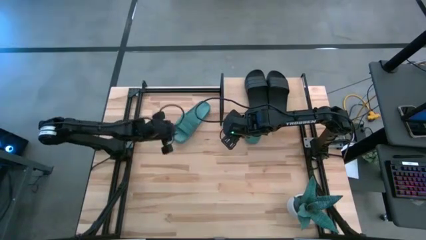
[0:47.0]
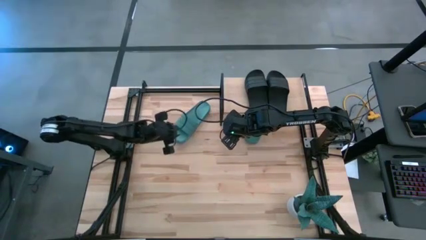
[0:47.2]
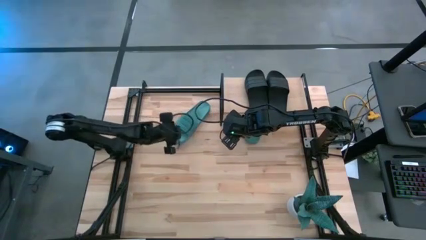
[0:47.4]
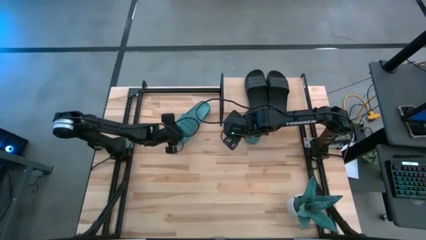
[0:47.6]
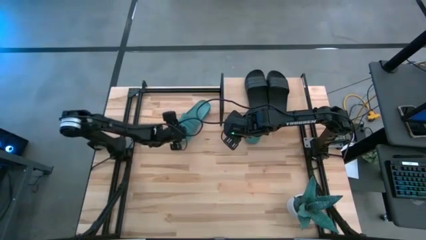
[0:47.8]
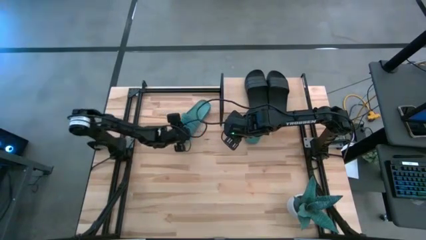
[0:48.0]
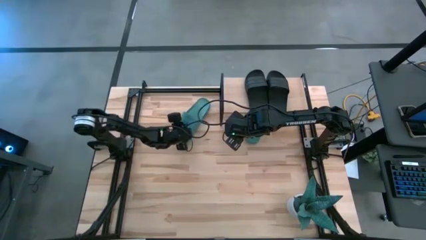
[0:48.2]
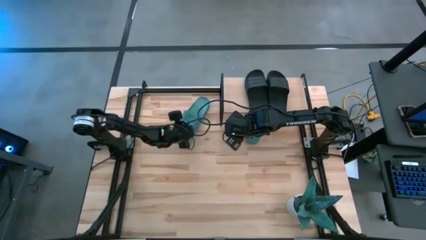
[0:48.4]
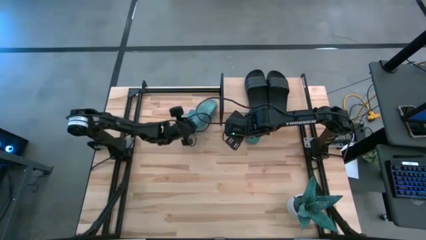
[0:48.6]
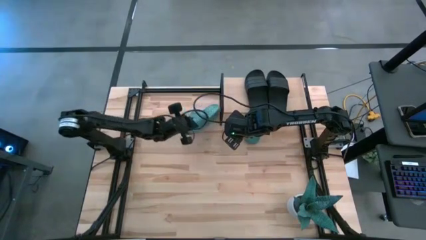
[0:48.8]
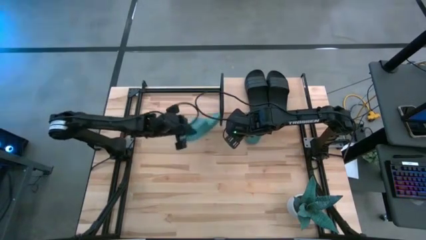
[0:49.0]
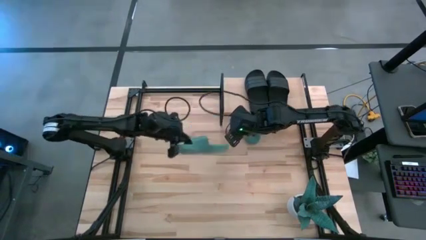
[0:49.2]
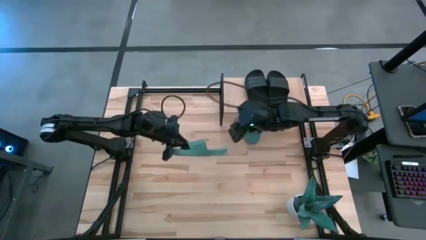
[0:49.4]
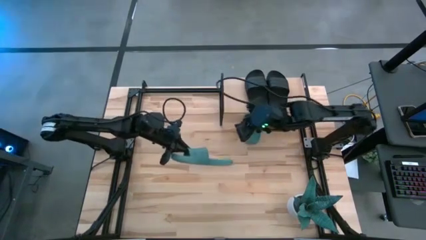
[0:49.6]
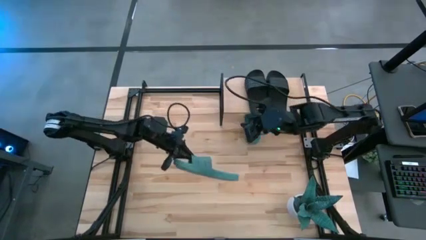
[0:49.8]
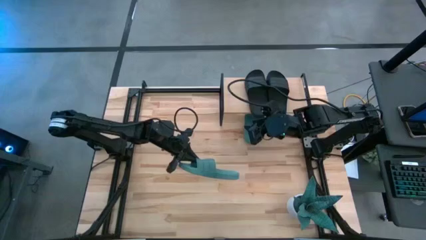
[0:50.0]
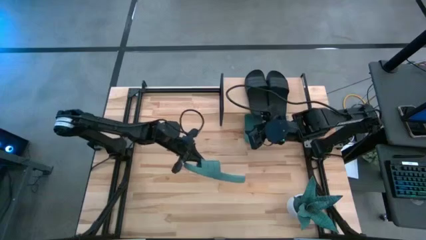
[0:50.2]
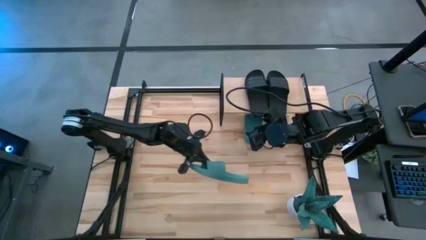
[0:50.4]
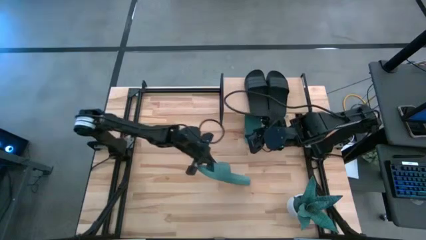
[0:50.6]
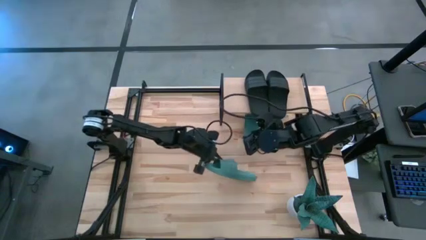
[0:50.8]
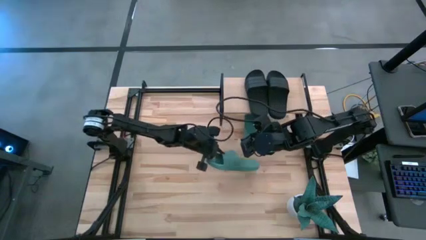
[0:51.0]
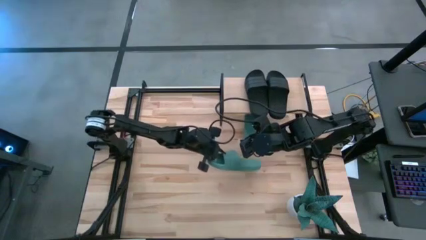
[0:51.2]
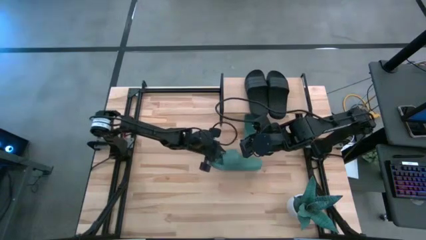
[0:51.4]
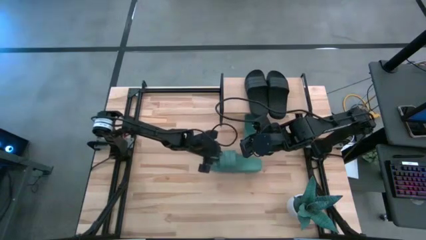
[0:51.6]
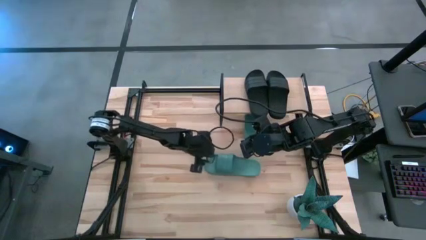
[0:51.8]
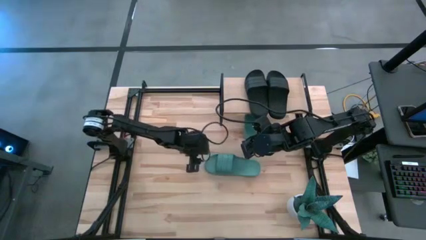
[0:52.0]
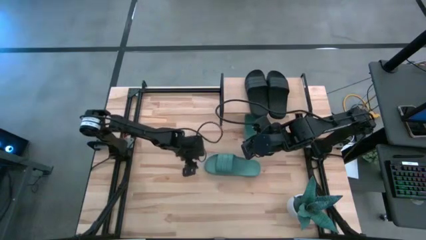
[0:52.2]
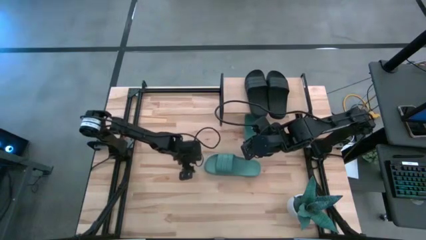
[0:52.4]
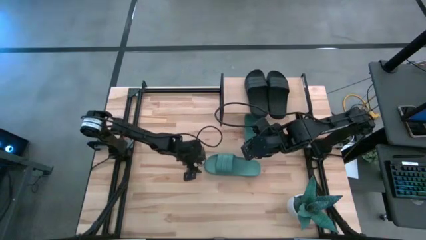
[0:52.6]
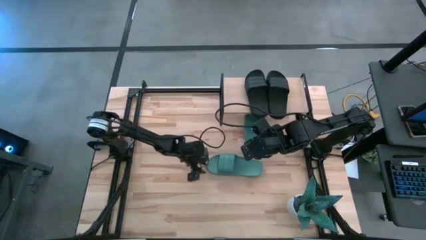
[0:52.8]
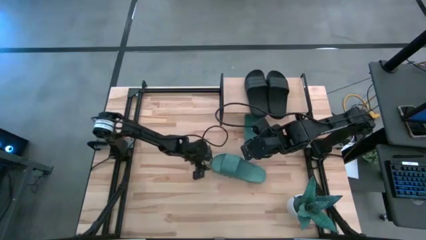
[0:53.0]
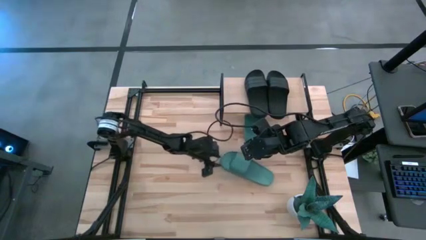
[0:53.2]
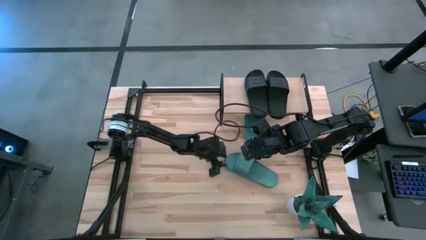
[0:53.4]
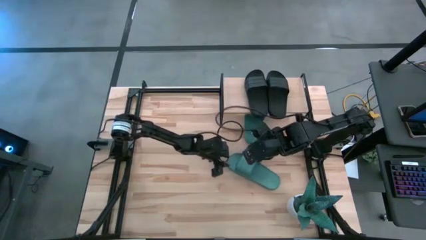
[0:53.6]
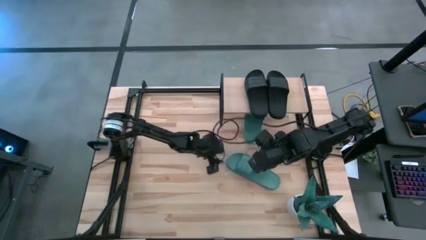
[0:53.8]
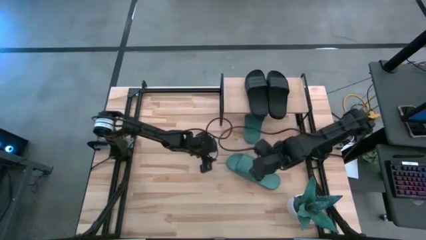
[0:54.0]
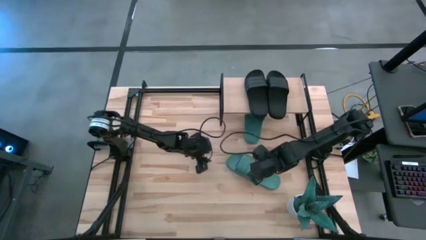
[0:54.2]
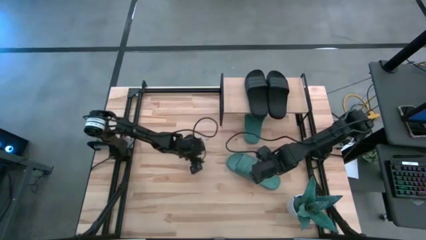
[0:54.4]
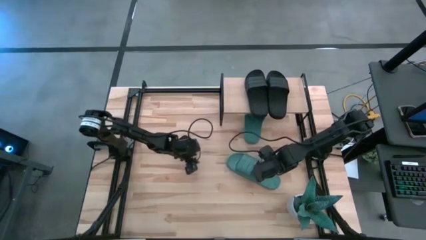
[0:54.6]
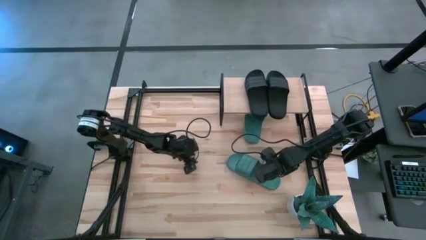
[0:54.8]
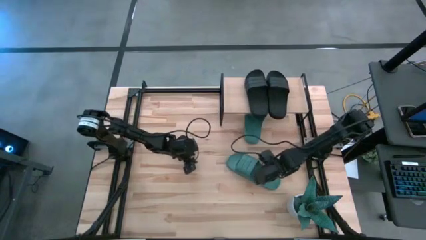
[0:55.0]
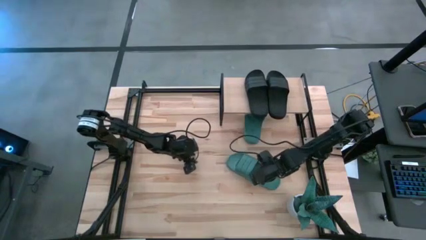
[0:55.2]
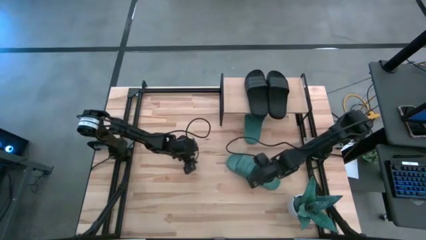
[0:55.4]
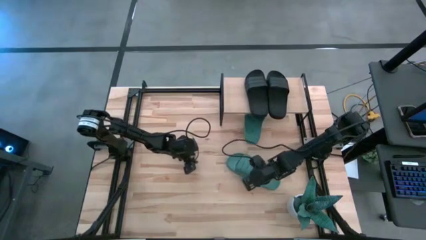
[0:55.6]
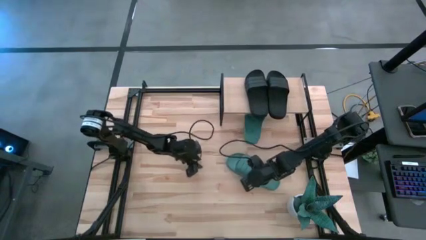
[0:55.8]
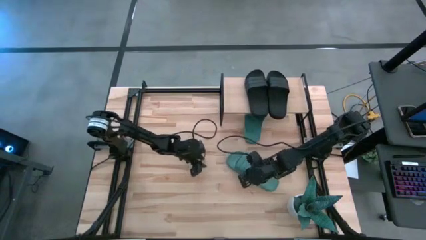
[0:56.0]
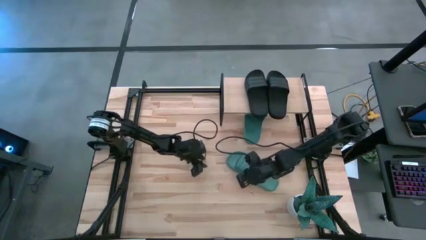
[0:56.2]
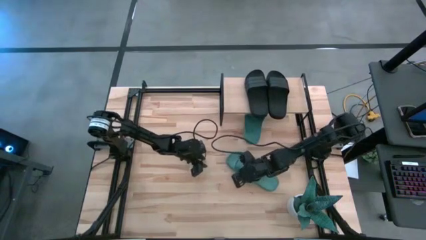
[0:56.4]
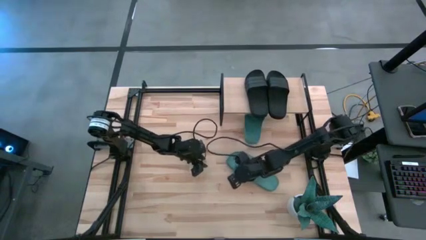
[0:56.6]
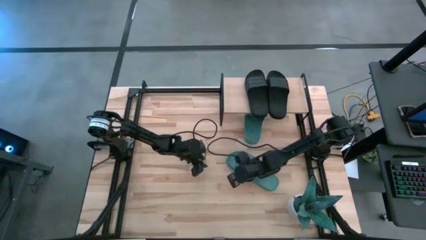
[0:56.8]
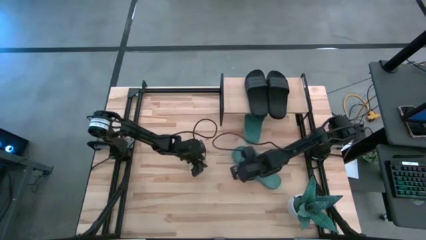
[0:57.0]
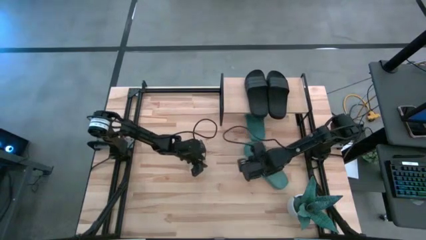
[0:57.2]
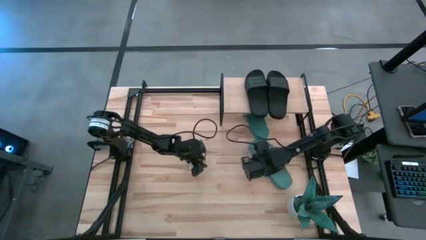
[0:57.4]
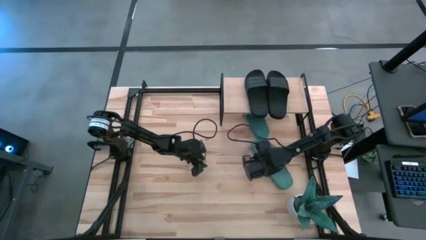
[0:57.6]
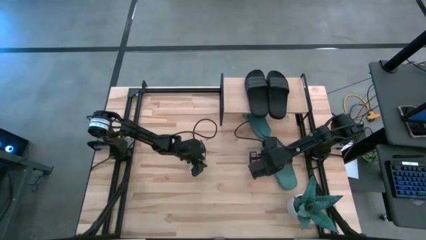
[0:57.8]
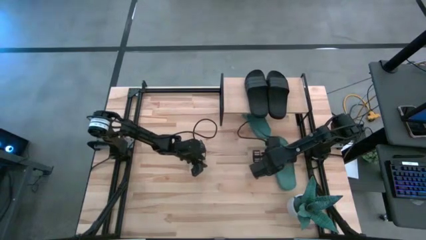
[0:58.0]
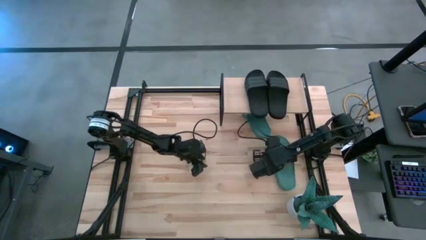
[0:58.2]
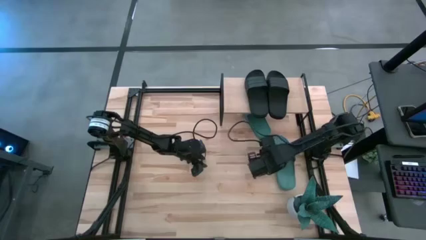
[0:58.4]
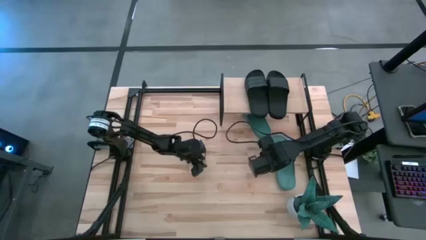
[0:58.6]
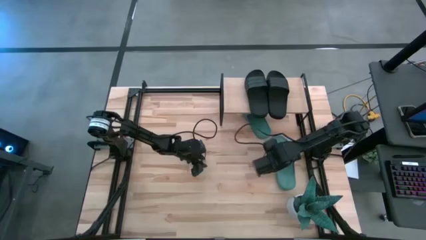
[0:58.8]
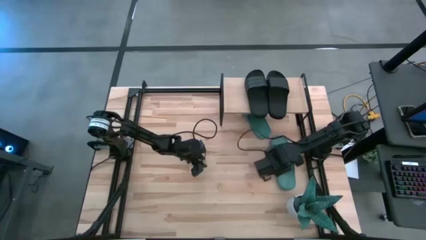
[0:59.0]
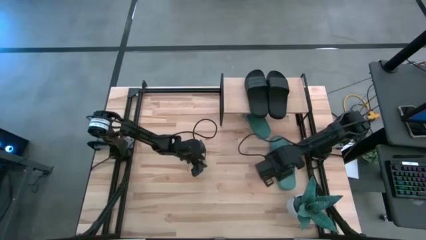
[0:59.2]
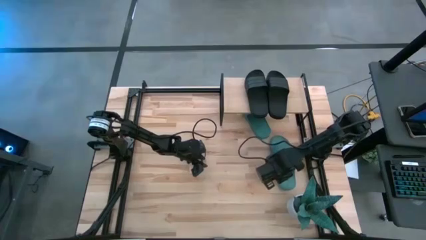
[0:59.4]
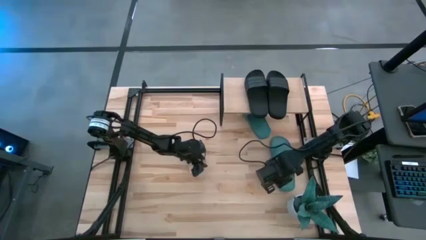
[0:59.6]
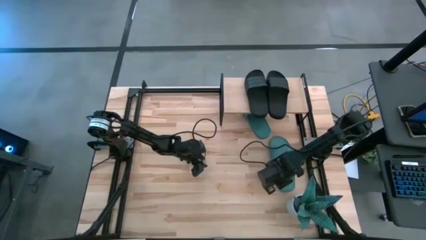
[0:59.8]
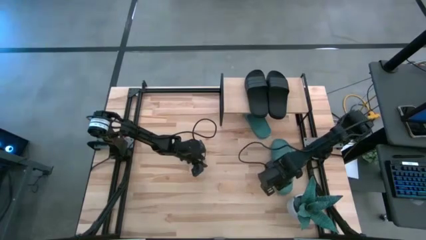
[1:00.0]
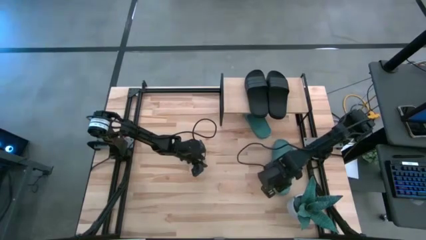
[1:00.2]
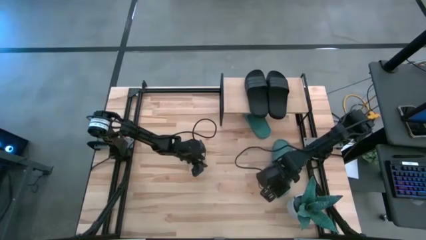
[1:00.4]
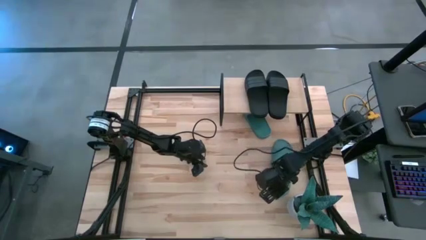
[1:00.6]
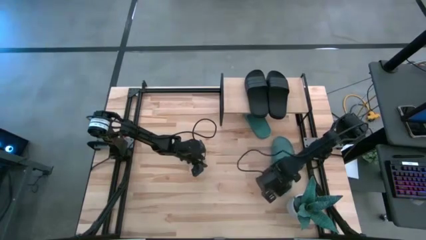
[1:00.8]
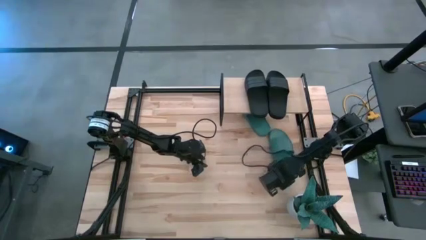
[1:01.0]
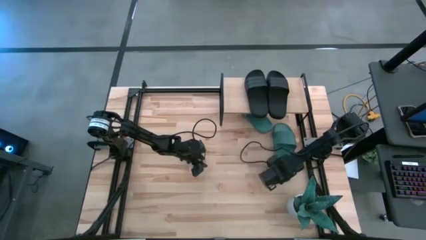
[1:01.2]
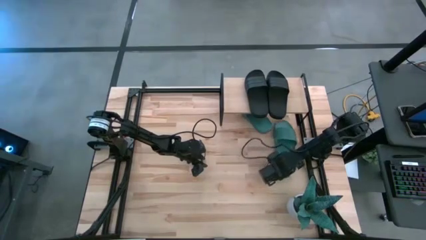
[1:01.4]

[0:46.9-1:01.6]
Task: Pick and place slides into the shelf
Put the green slipper under the shelf
